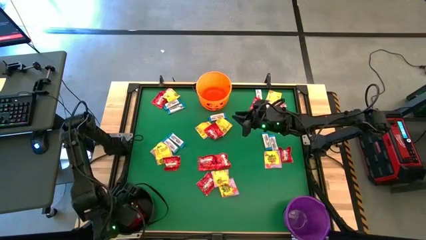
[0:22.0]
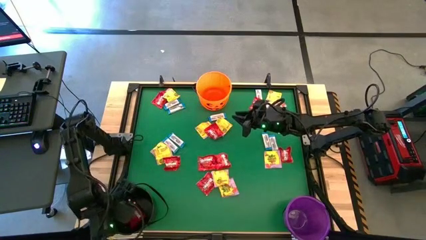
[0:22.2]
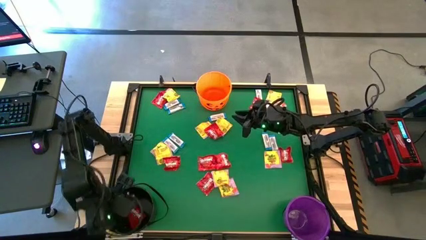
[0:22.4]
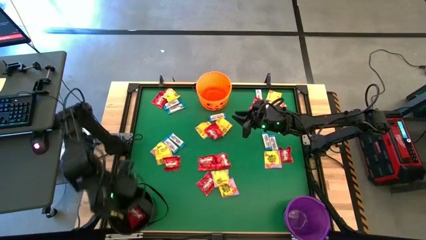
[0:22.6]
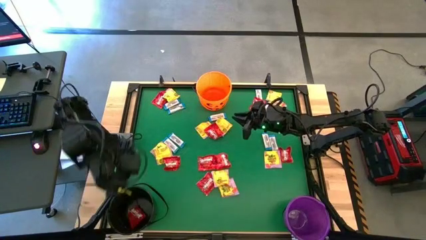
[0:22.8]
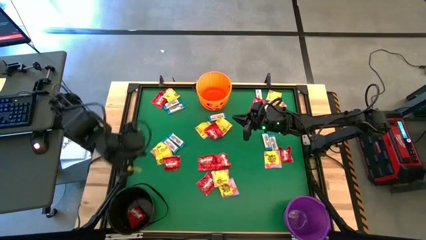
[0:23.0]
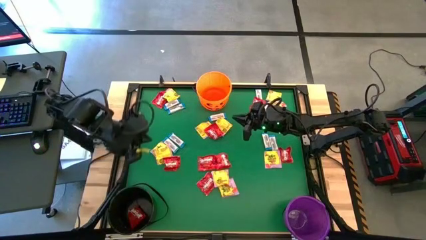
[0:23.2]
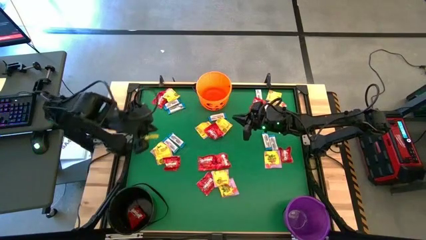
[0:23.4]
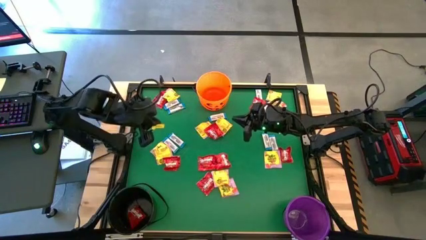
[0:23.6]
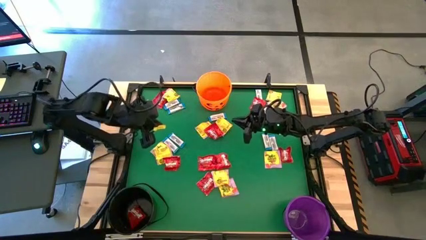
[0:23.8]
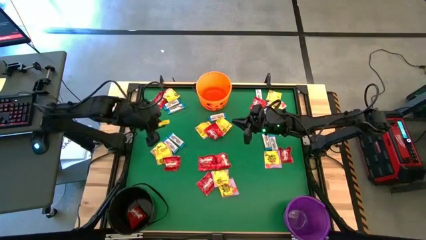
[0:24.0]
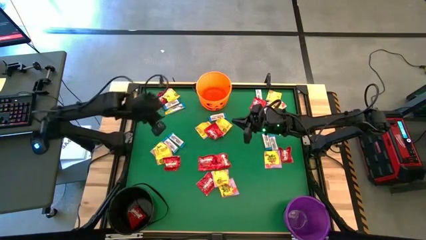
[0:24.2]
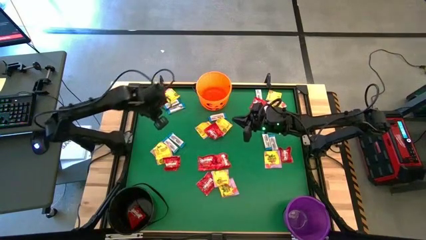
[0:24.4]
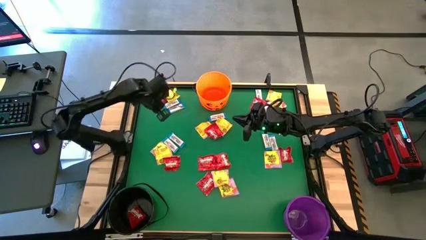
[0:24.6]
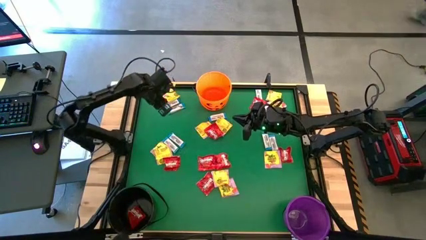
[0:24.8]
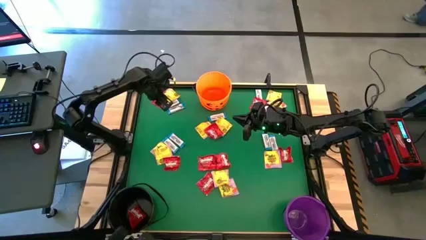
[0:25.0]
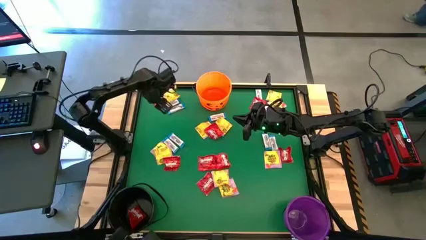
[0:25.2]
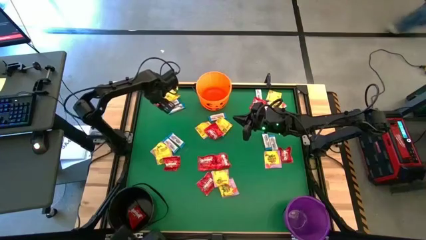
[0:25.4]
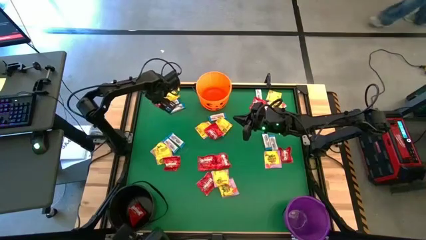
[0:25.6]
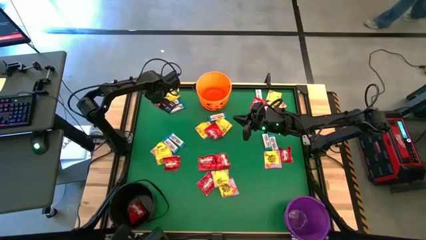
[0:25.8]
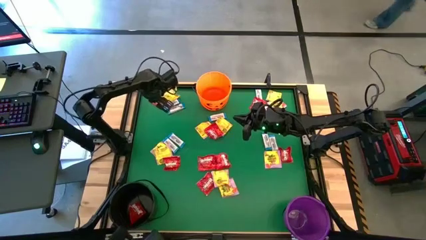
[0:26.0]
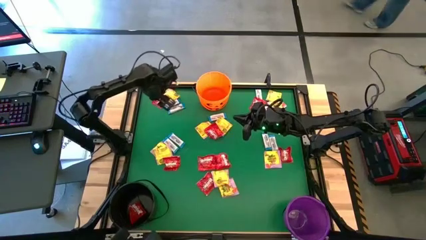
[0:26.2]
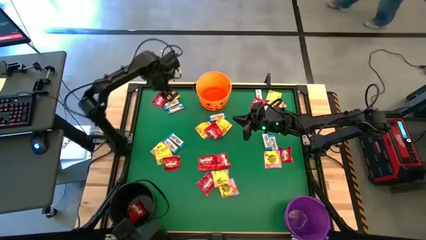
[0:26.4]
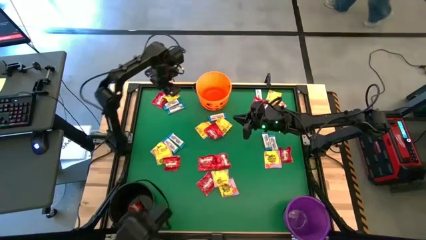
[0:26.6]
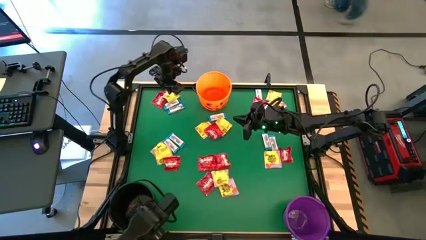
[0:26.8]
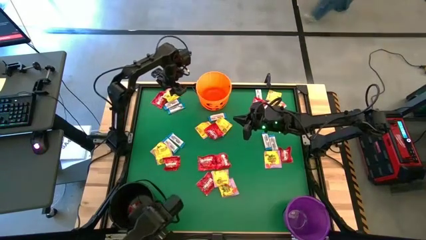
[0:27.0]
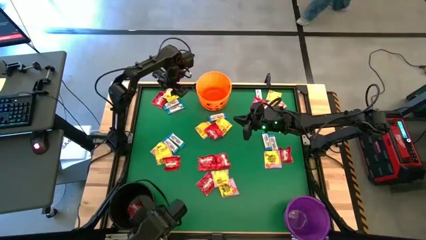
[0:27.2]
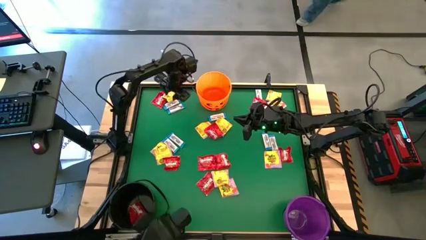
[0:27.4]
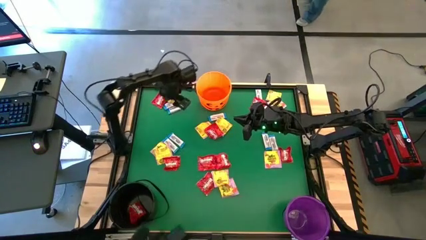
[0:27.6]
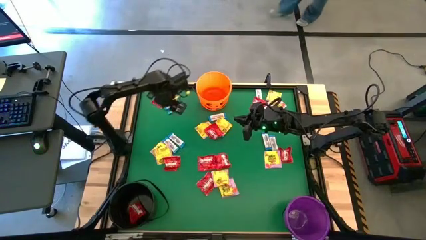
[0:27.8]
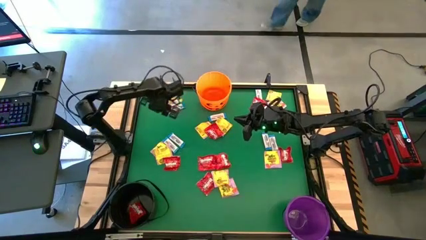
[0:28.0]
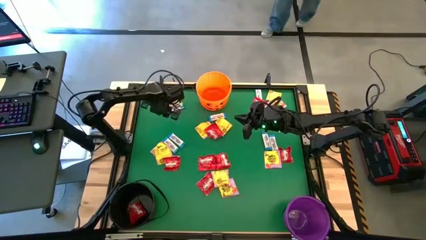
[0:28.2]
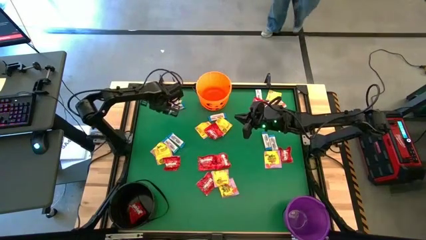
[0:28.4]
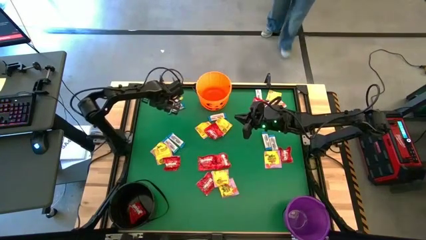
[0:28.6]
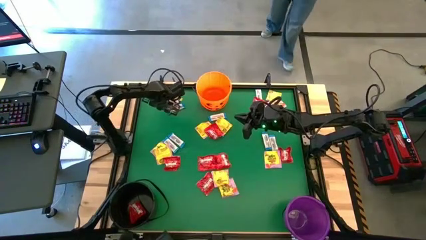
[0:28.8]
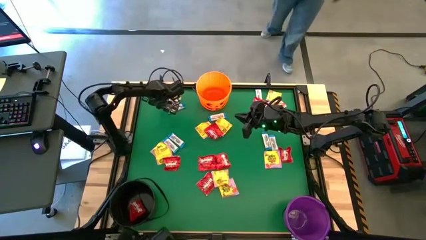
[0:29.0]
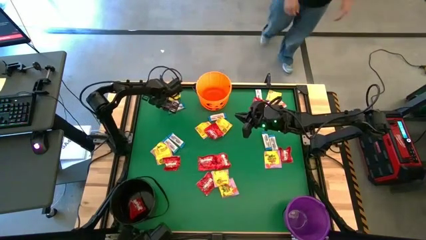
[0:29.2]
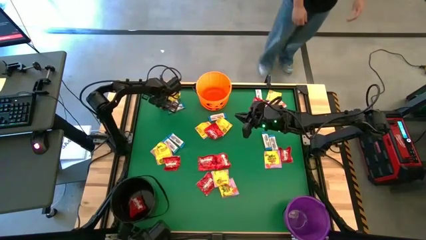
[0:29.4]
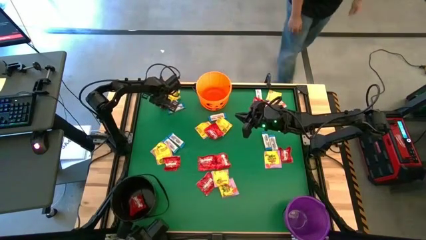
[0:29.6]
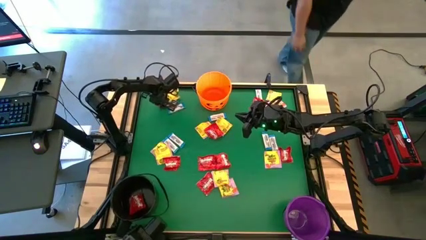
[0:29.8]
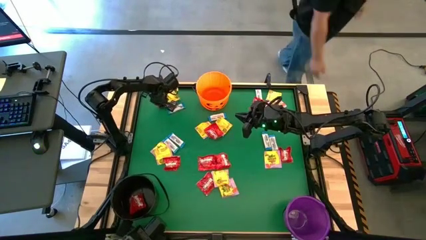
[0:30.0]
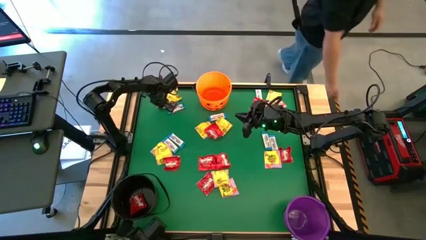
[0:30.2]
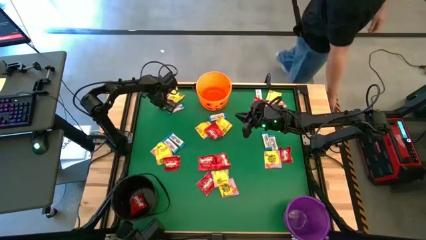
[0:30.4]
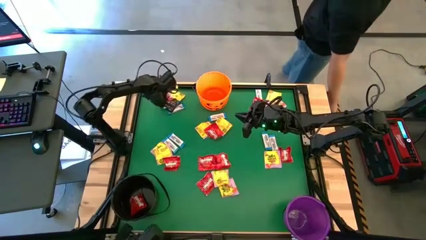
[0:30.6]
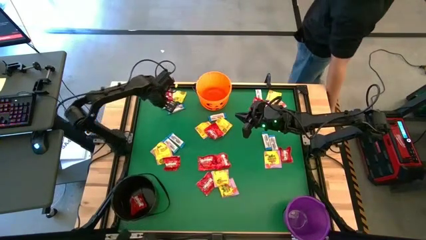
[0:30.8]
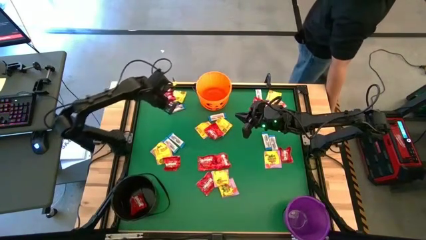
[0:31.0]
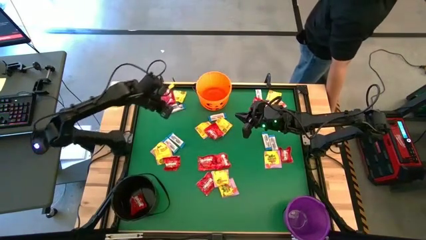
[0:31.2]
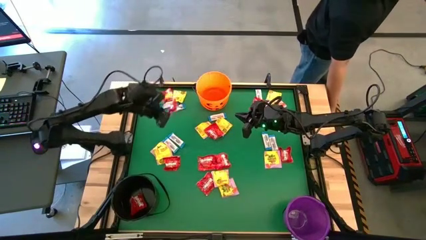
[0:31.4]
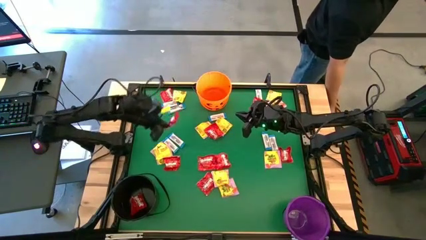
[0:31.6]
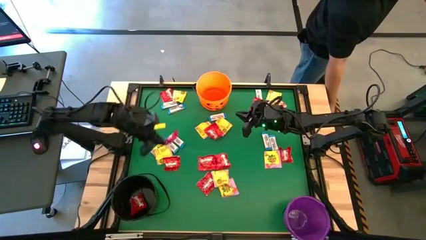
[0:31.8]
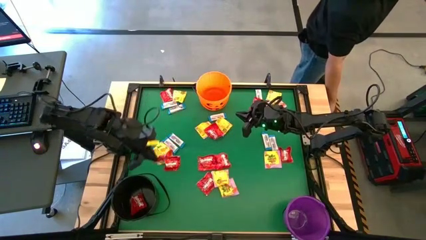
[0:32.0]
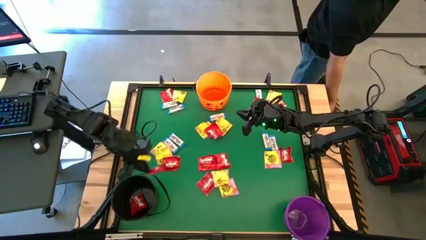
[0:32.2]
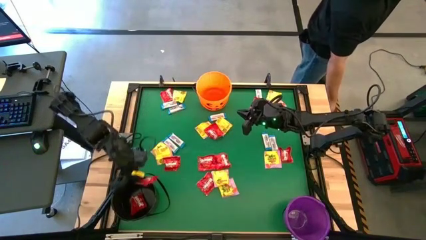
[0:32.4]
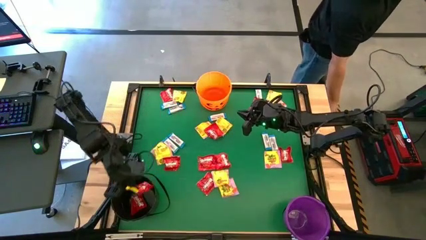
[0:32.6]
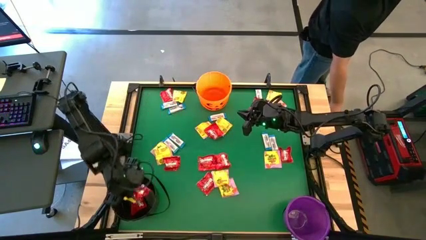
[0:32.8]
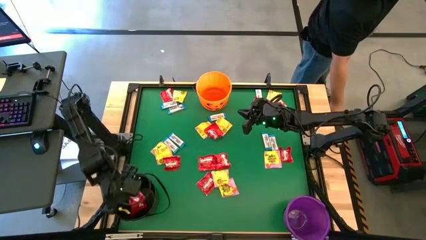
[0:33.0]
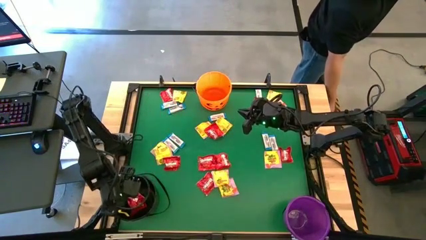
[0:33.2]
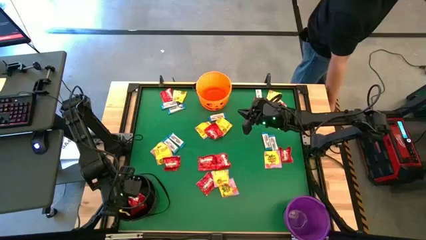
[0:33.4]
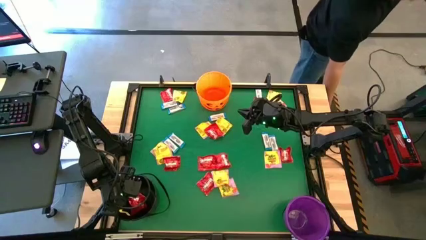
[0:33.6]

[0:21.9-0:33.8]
Task: Sort candy by brand, put in halloween buckets
Put the red candy into the black bucket

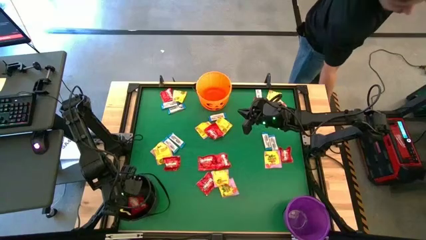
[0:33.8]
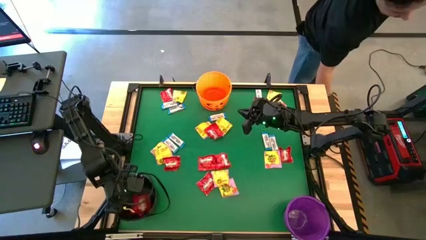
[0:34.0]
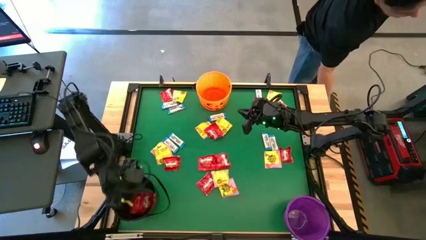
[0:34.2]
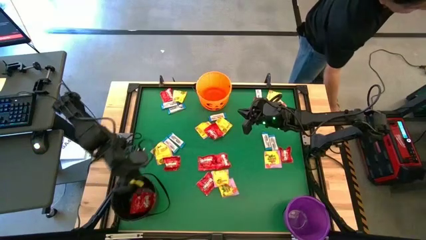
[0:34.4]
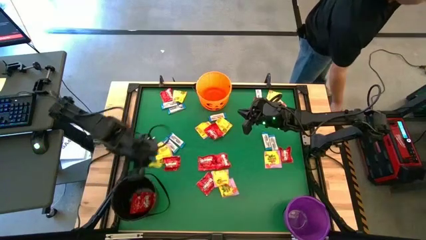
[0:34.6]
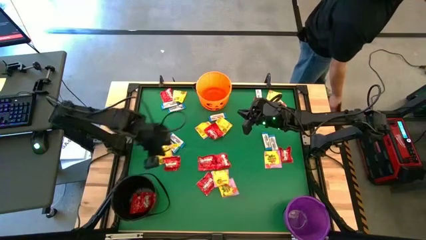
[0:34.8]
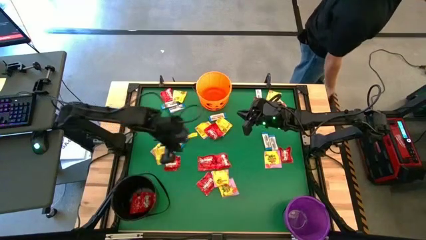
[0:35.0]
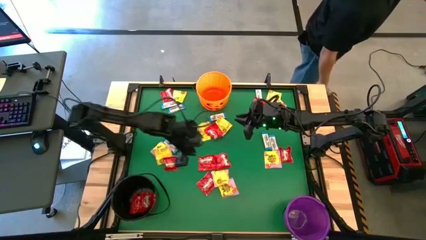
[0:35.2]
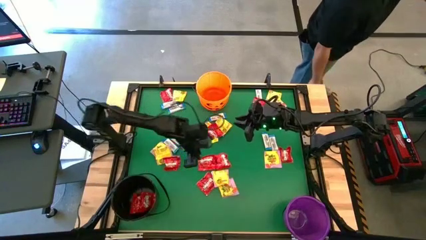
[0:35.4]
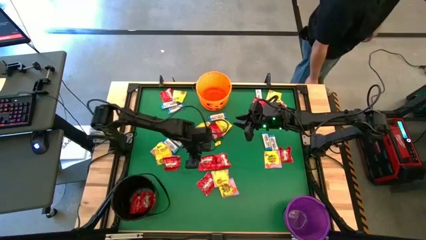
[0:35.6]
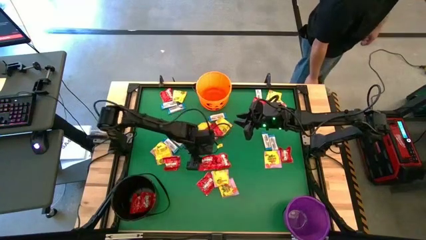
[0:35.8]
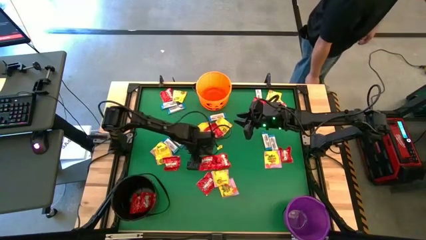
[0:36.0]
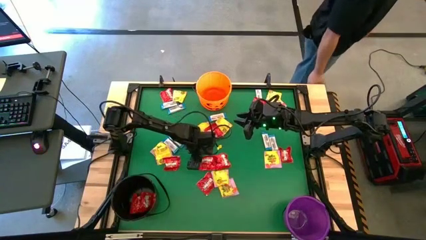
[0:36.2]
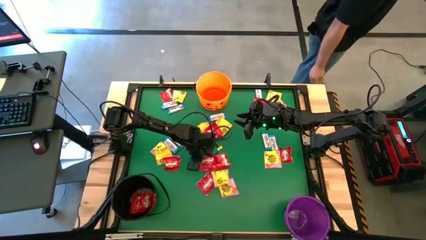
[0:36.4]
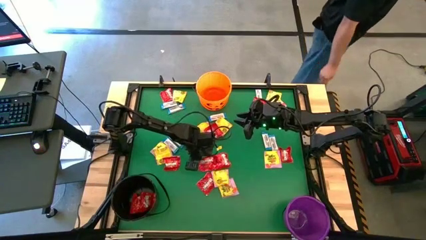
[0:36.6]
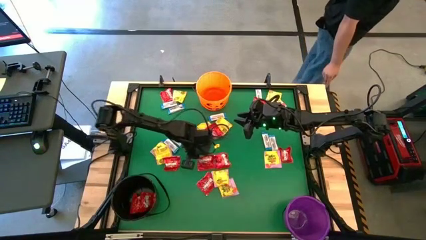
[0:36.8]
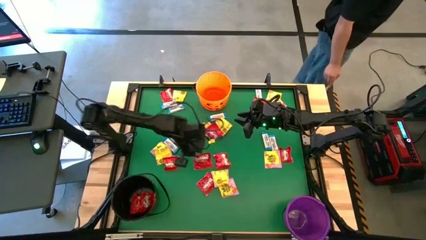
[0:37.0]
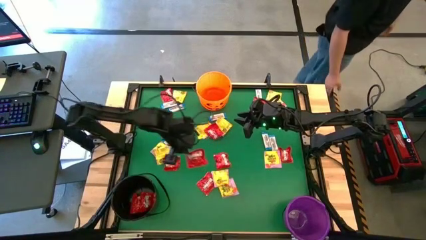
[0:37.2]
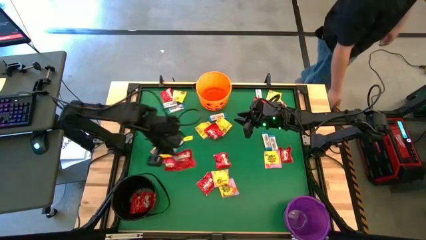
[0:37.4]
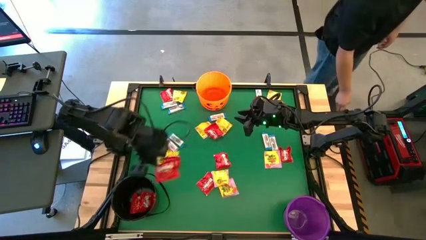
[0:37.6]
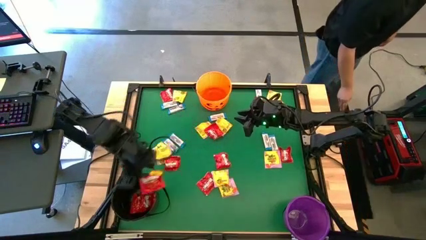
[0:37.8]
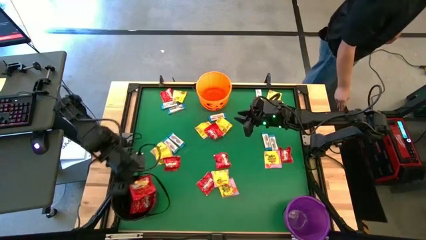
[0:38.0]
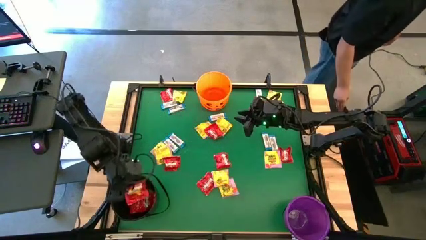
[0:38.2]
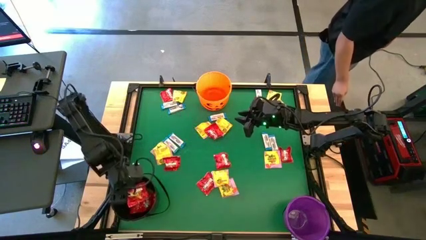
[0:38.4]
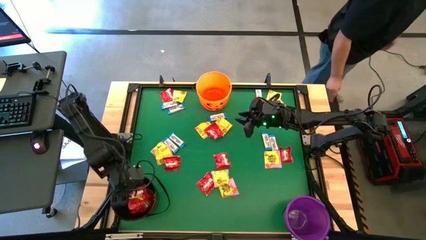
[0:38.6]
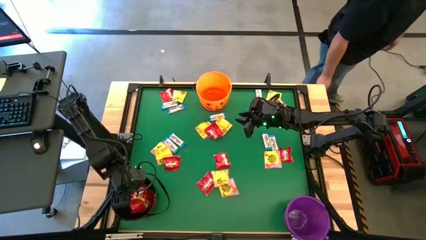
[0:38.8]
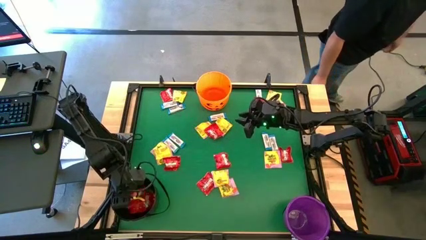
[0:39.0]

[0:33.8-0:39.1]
Put the red candy into the black bucket
